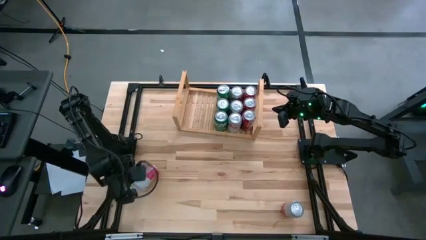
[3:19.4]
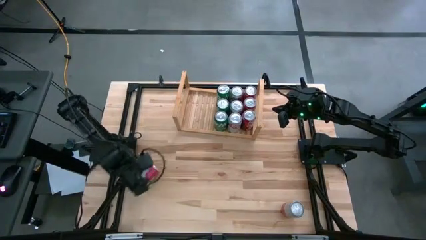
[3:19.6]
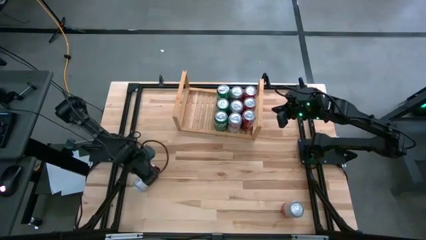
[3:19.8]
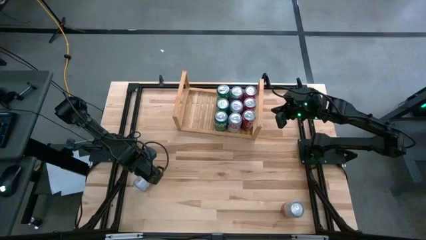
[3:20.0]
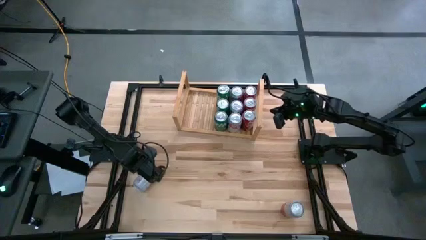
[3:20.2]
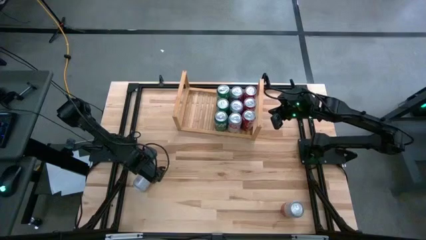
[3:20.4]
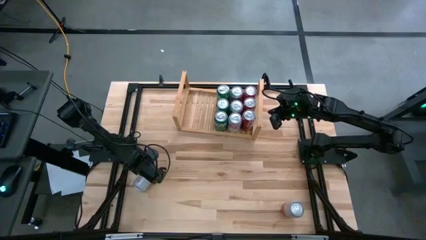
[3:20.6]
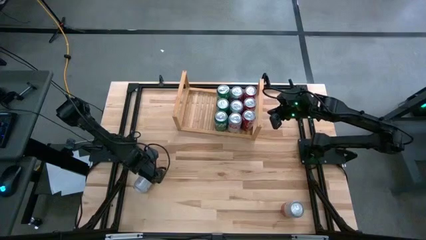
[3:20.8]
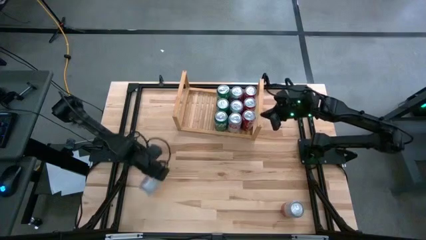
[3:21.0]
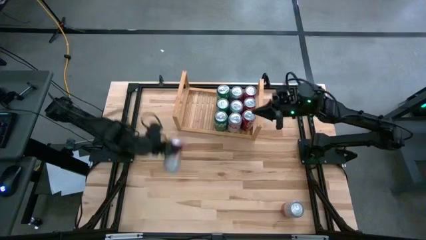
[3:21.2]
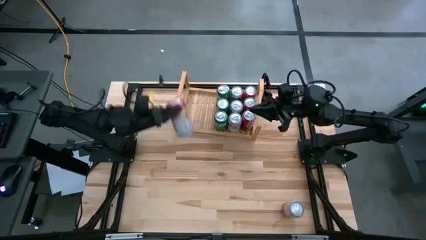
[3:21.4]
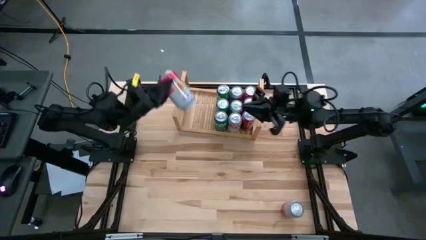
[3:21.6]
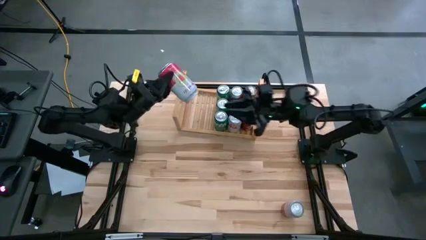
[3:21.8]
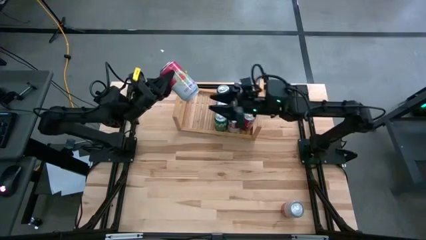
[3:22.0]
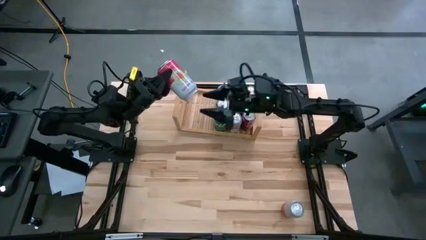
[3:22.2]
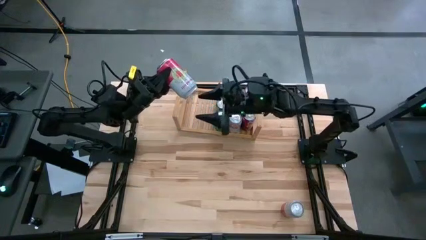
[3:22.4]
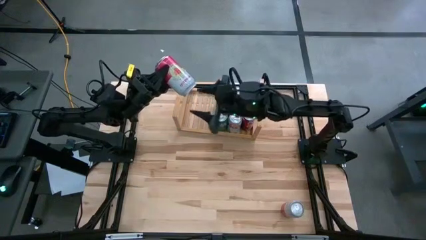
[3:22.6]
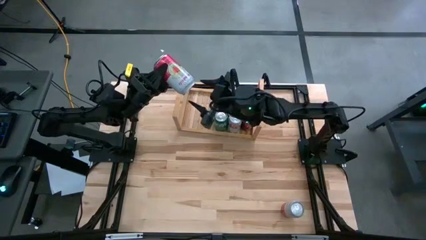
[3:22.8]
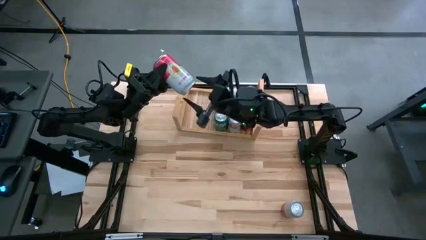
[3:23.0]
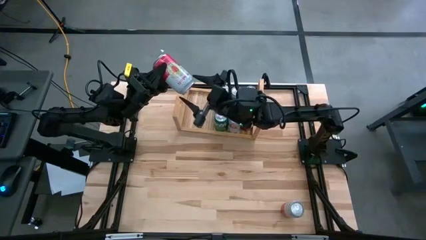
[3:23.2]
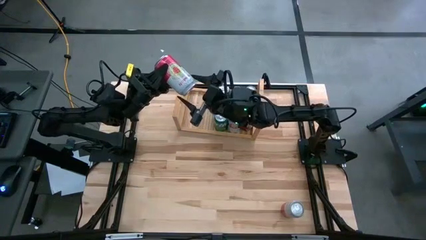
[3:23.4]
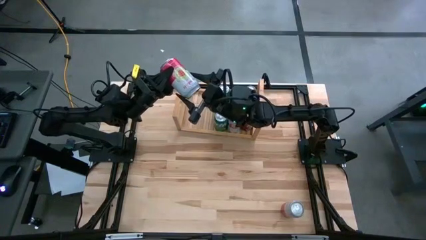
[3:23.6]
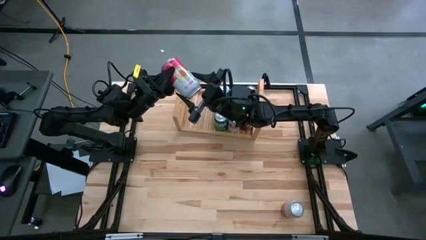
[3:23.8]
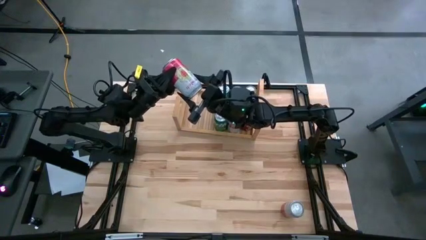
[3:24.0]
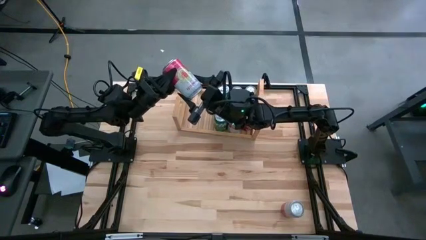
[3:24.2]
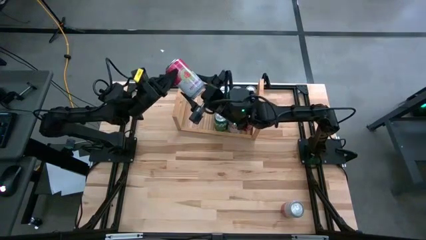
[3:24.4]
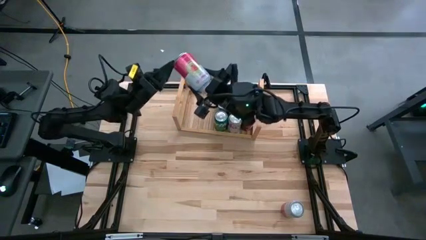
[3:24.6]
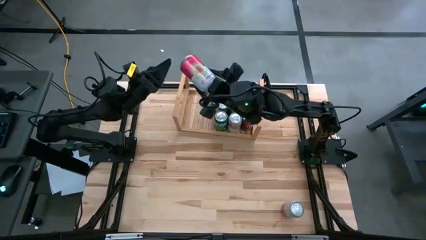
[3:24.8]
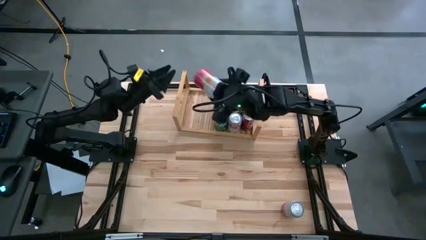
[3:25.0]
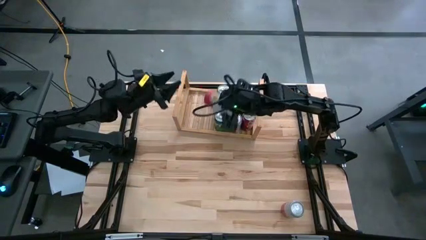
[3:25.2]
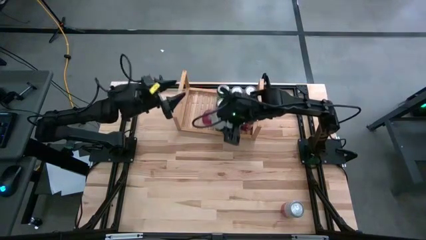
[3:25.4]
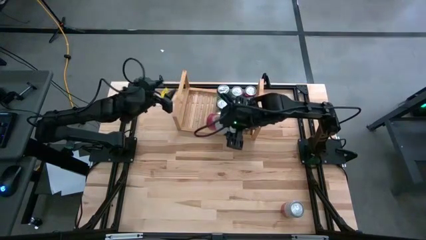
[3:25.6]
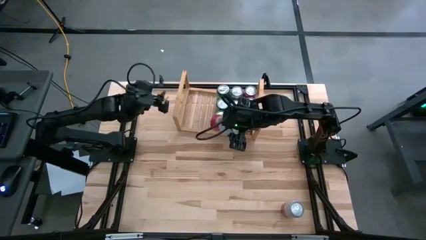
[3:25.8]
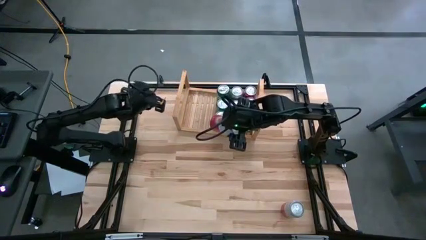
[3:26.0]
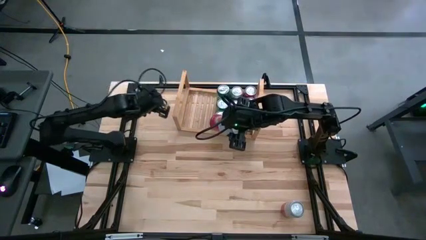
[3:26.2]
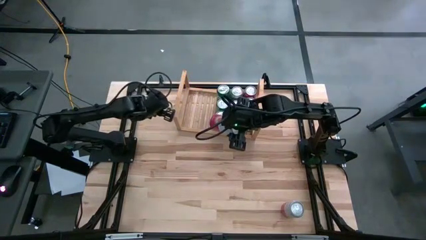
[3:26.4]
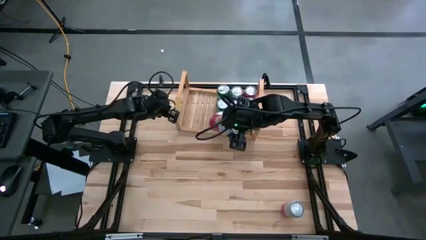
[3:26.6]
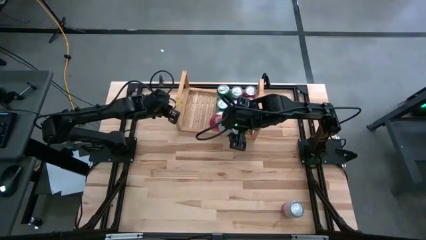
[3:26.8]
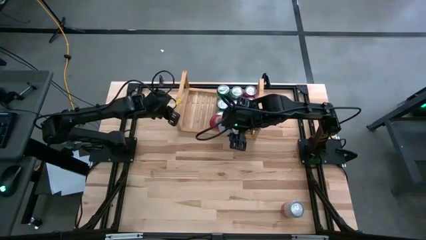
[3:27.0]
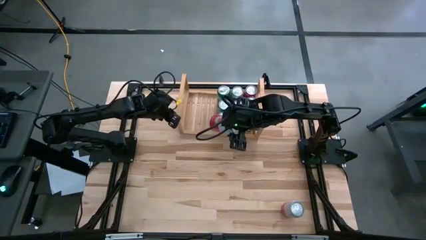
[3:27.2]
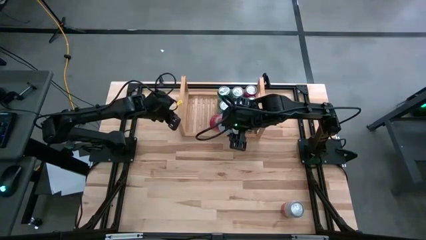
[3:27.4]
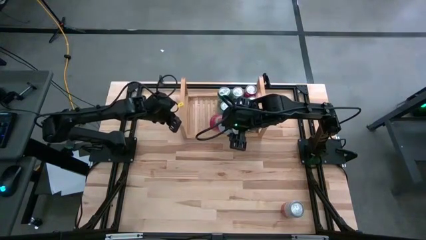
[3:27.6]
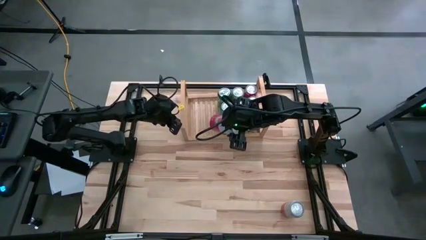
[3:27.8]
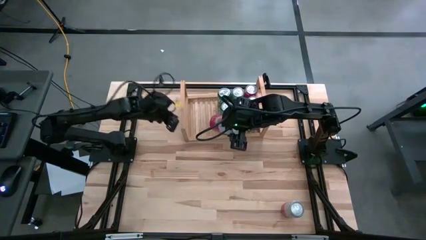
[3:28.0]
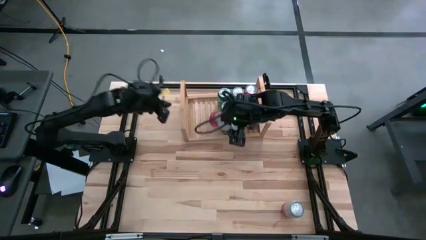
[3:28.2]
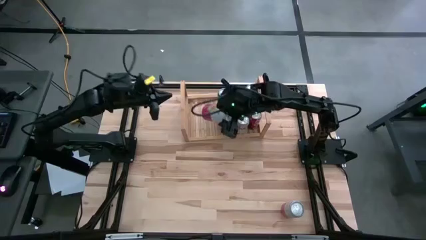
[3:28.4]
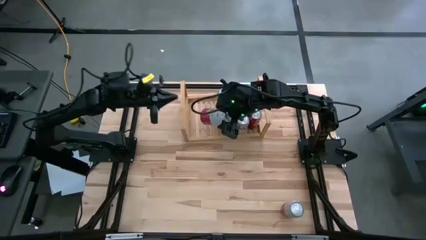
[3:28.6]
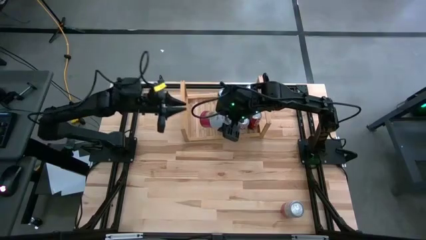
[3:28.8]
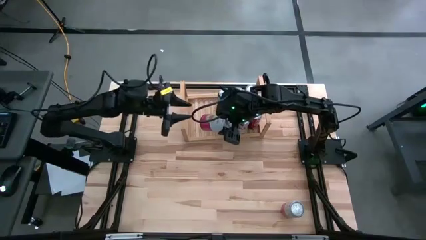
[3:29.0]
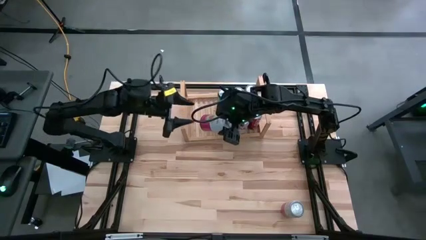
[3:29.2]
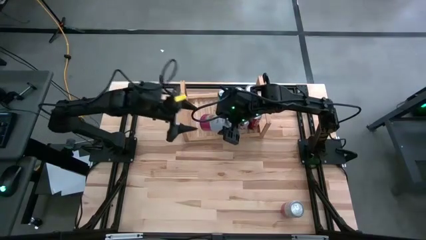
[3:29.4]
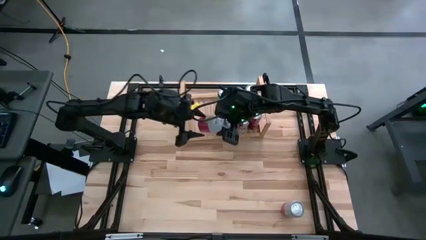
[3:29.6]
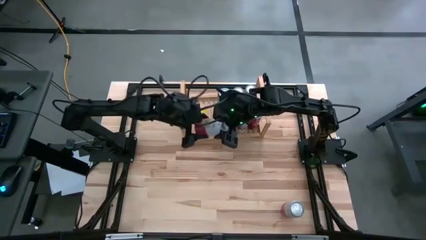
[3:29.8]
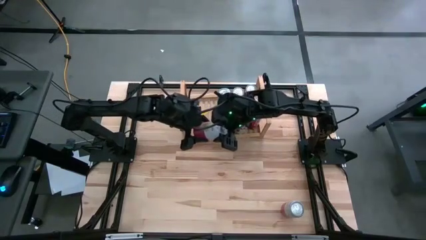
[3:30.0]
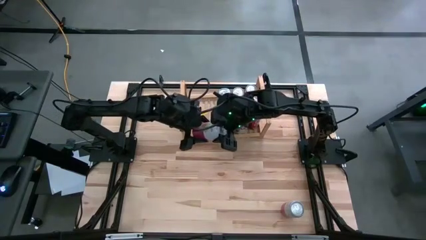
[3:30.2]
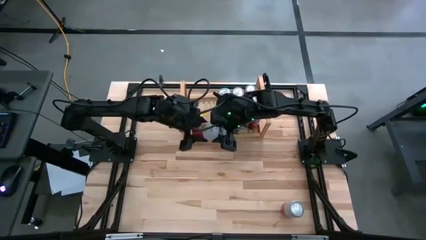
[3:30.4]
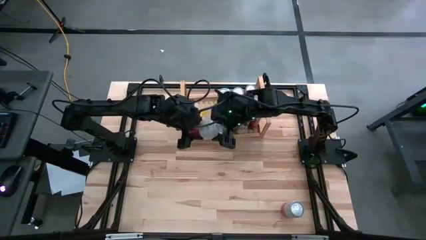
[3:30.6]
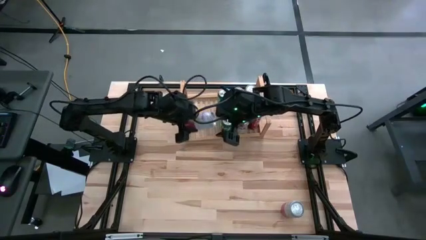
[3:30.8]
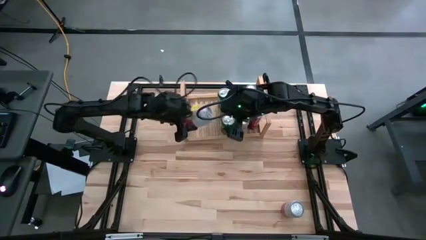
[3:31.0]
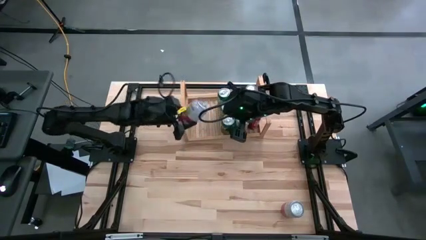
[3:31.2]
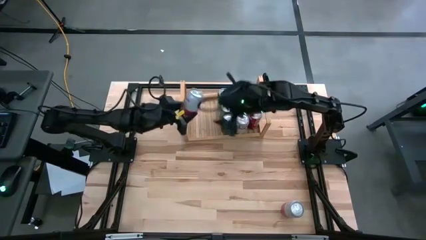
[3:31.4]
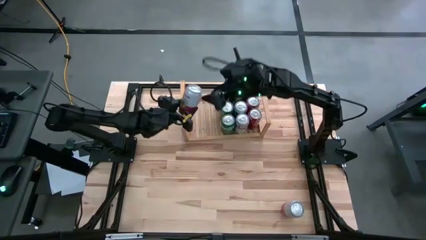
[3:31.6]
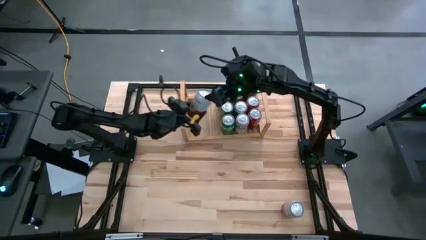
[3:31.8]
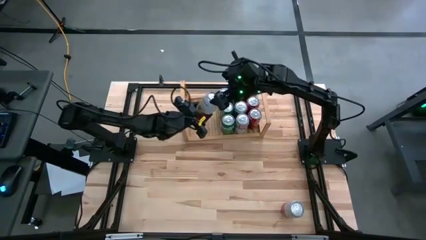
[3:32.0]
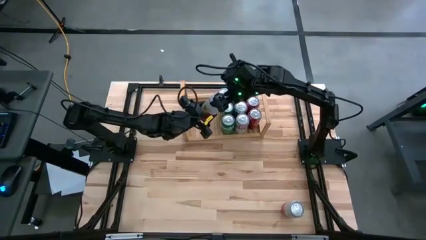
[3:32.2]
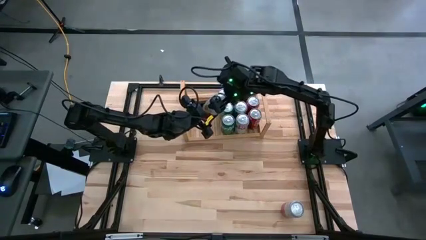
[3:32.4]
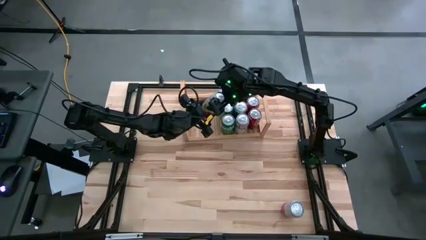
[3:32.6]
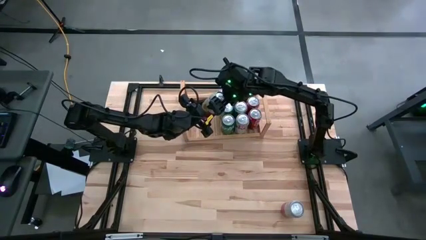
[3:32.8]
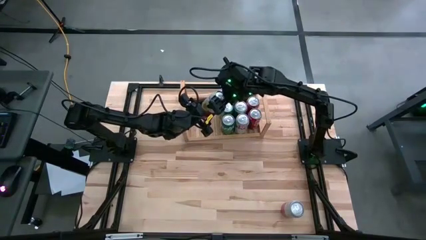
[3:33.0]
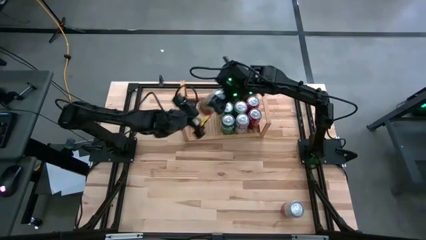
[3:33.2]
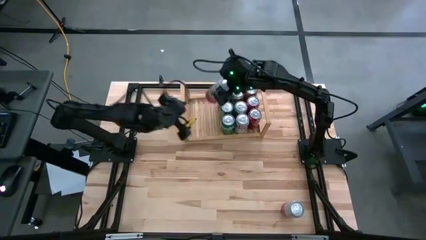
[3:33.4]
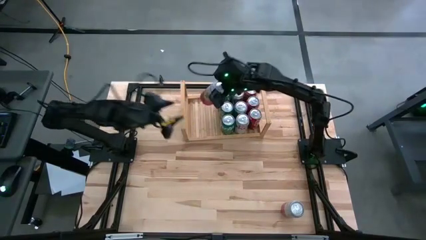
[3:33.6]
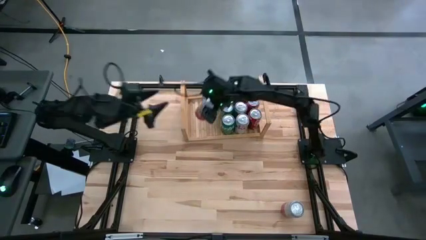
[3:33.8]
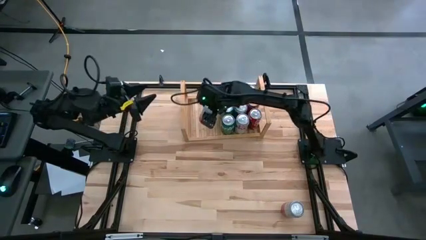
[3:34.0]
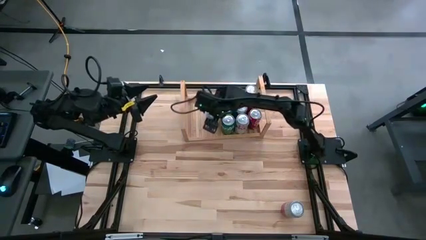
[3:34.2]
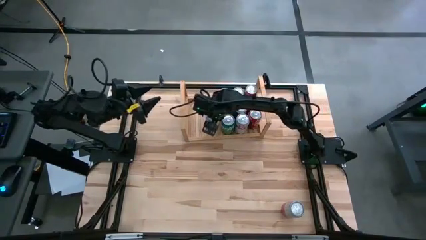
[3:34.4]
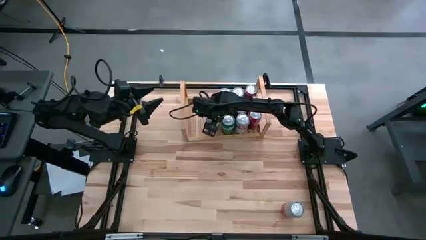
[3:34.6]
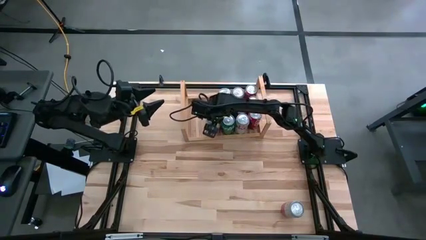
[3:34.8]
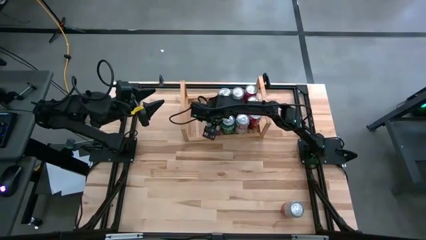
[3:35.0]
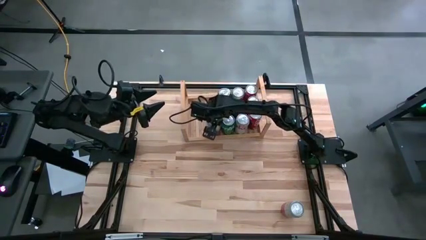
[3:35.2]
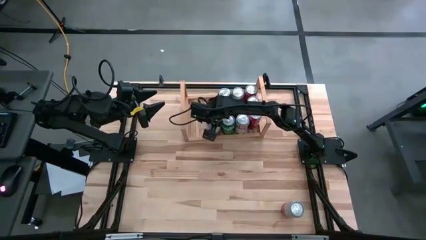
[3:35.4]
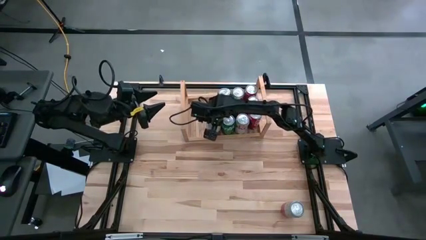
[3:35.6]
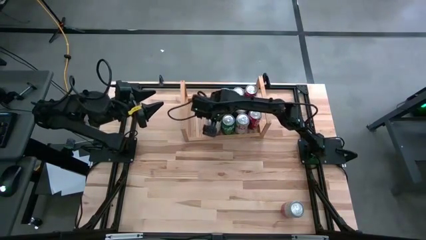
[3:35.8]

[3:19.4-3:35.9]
Task: Place canned beverage on shelf
Put the left pink-white soda can on the shelf
